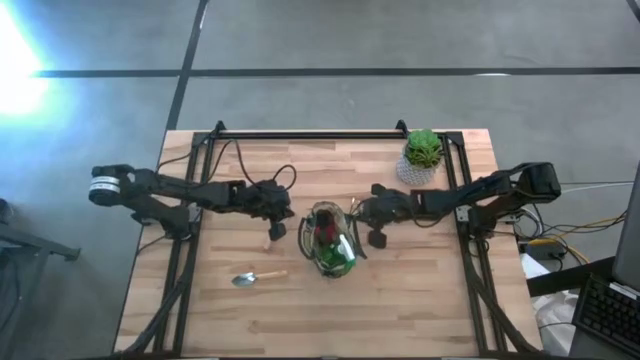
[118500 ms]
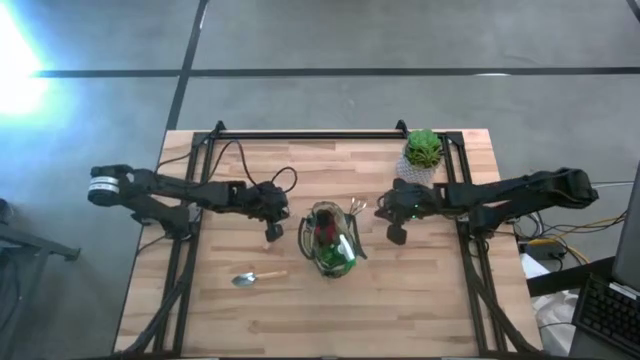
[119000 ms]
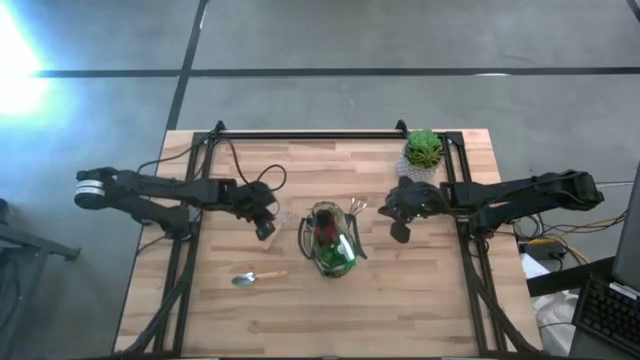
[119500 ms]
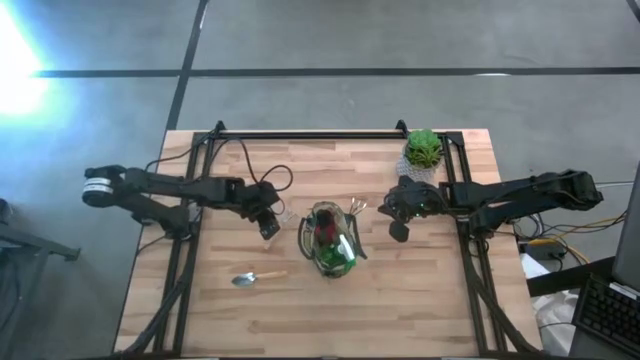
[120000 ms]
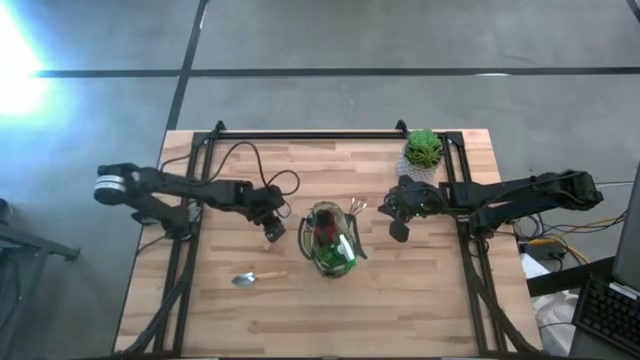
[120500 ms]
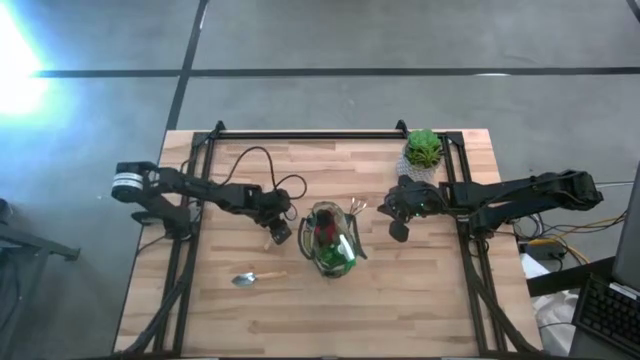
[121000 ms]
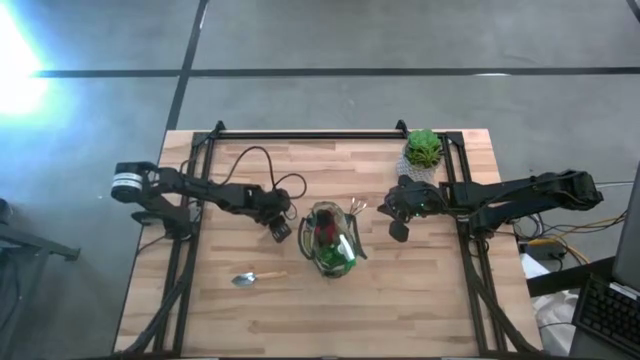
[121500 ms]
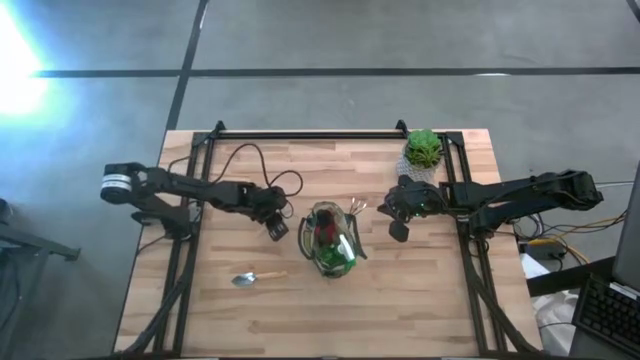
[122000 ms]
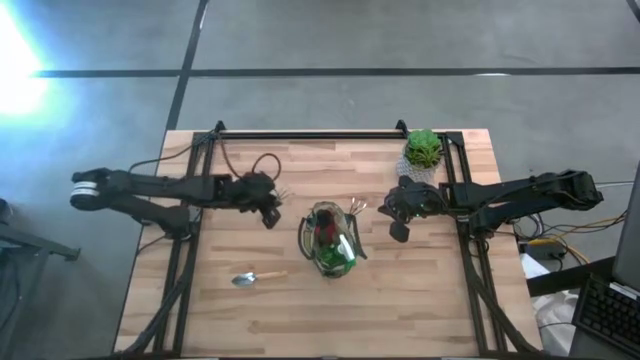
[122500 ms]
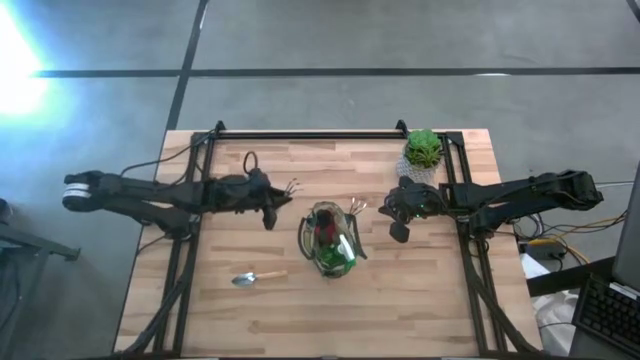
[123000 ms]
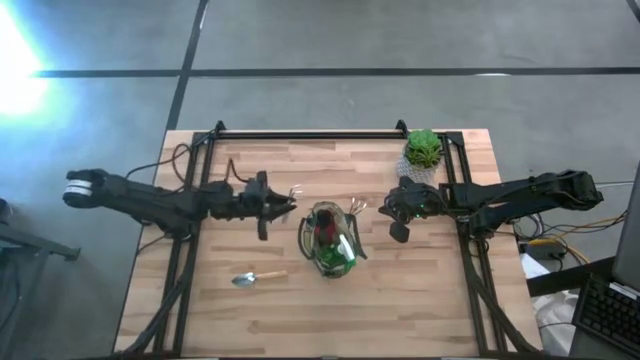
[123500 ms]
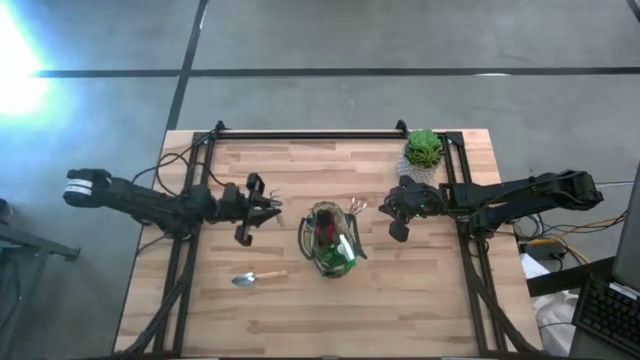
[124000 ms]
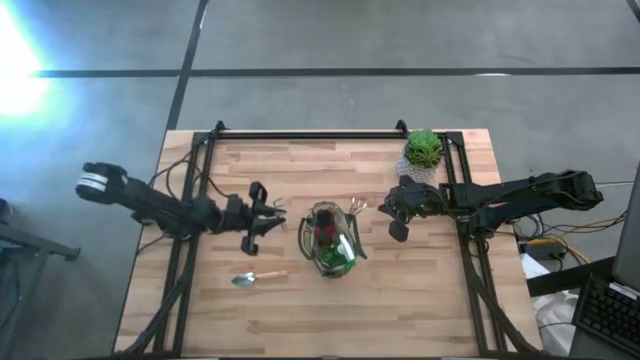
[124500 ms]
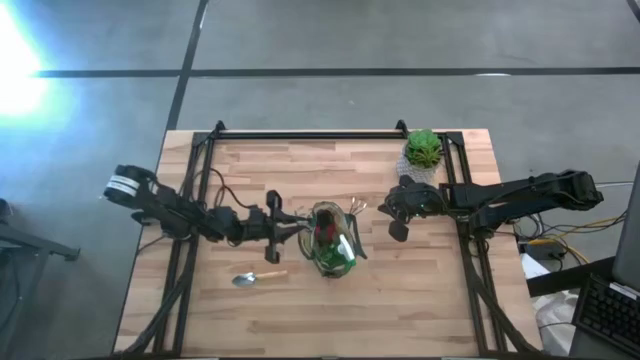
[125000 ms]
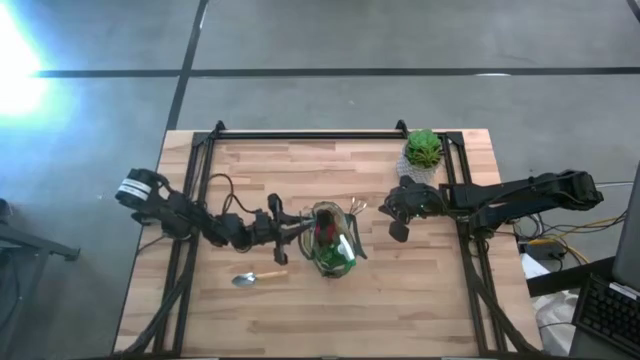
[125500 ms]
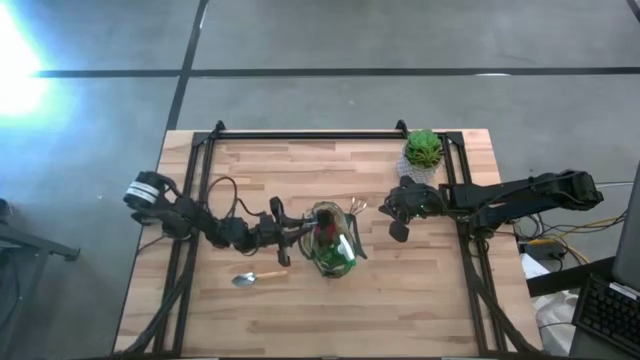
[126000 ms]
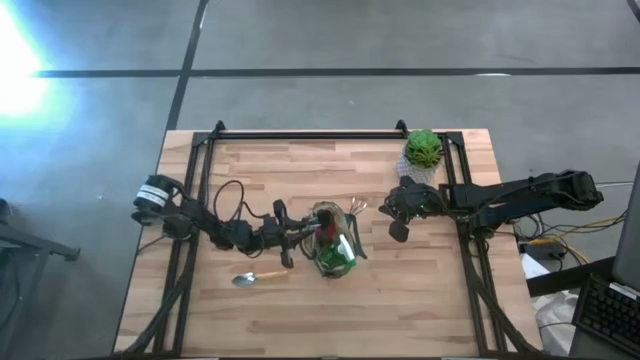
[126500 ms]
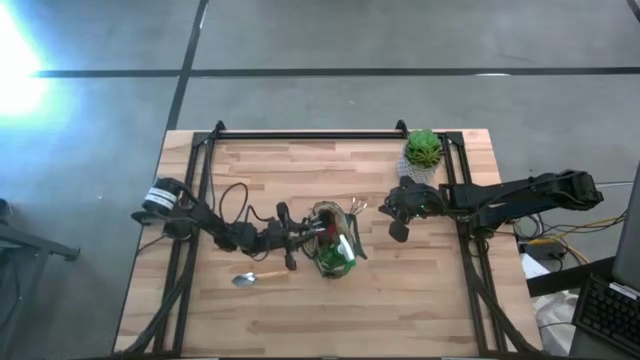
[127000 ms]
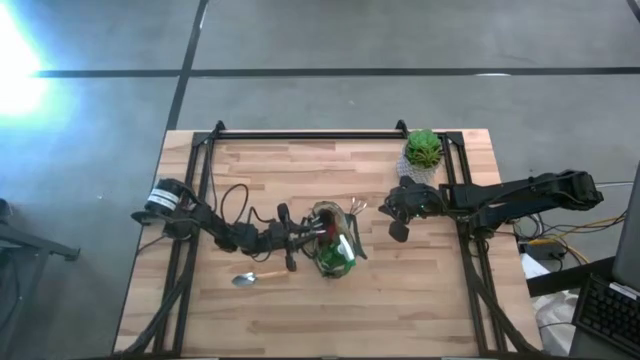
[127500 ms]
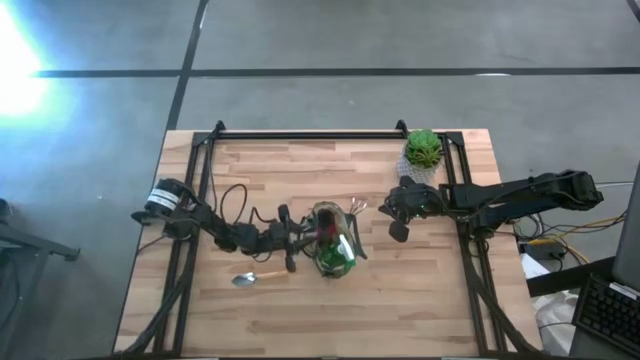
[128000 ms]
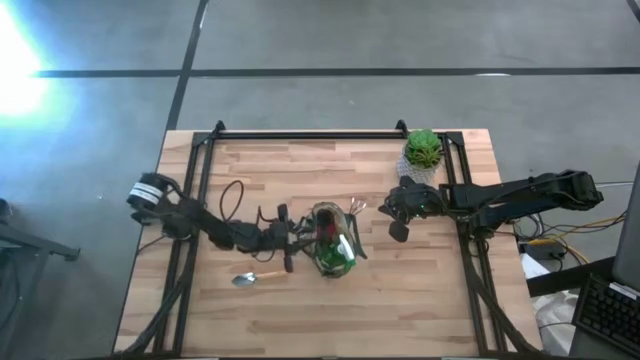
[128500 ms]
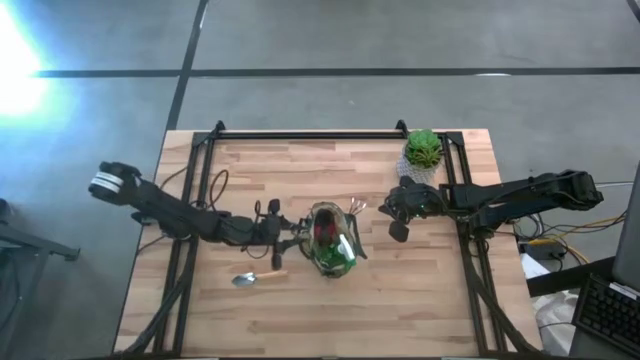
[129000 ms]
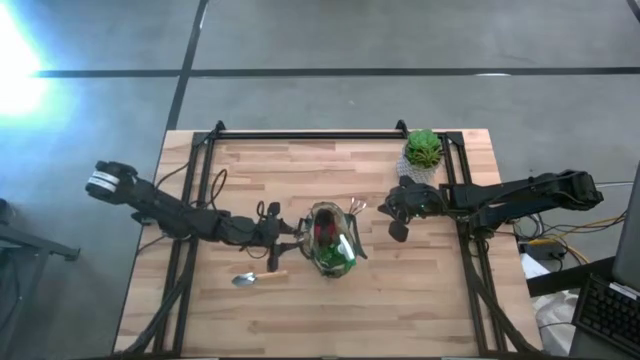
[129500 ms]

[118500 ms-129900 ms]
Task: Pick & Place Garden tools in Gardening bag
Put the light brown hand rake into the green gardening bag

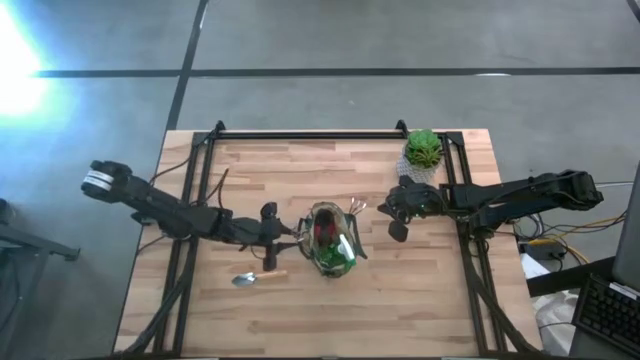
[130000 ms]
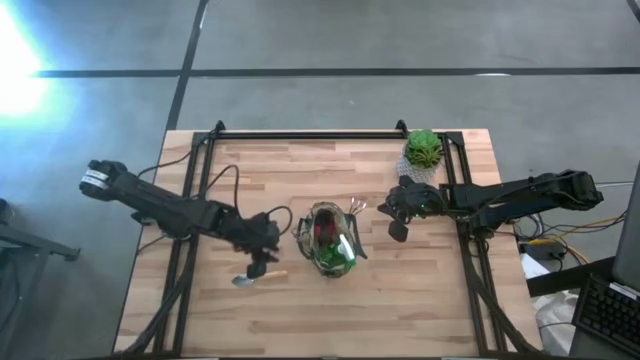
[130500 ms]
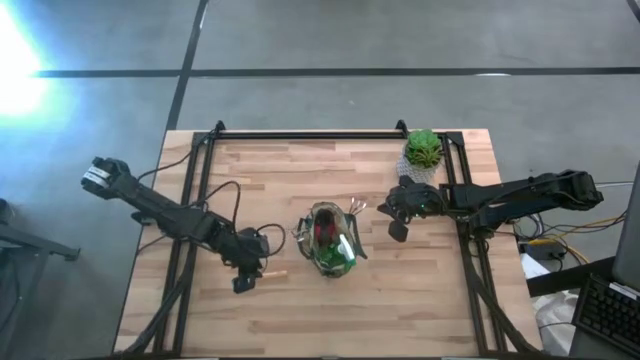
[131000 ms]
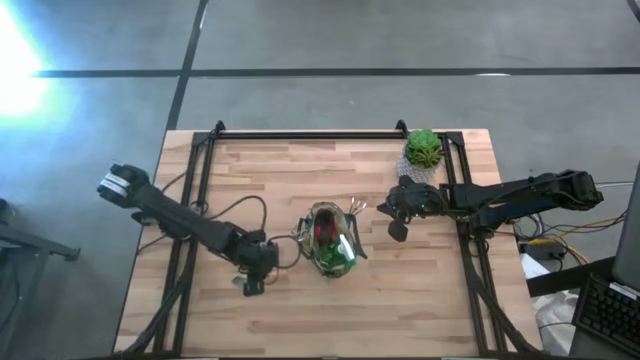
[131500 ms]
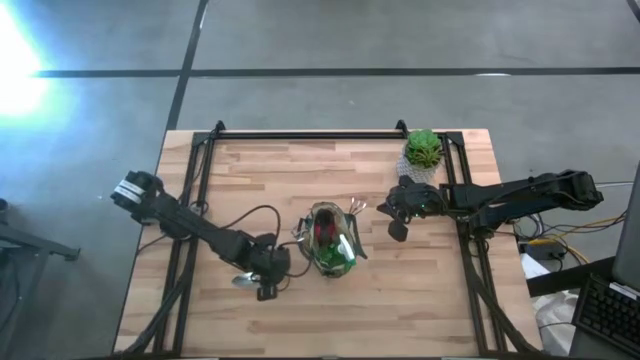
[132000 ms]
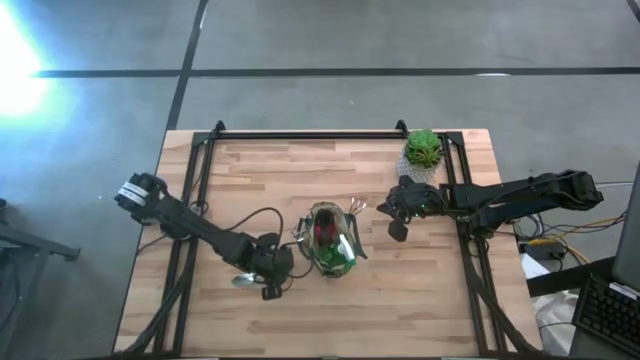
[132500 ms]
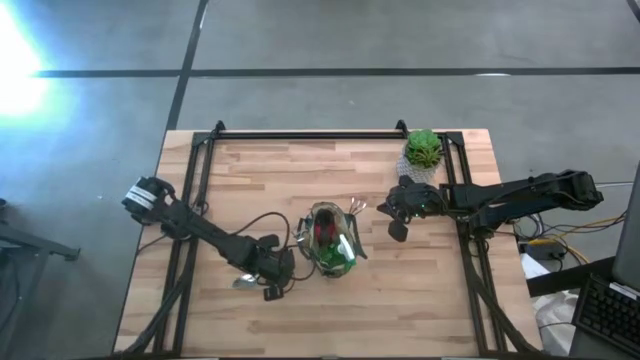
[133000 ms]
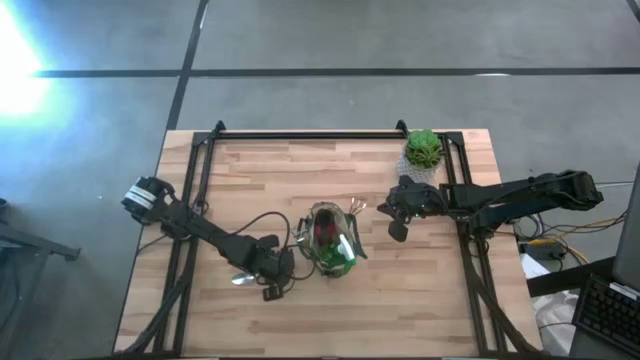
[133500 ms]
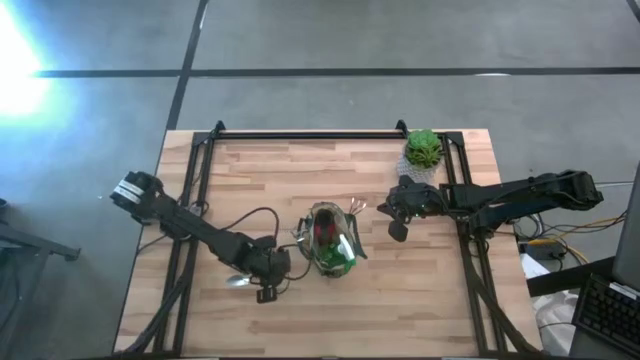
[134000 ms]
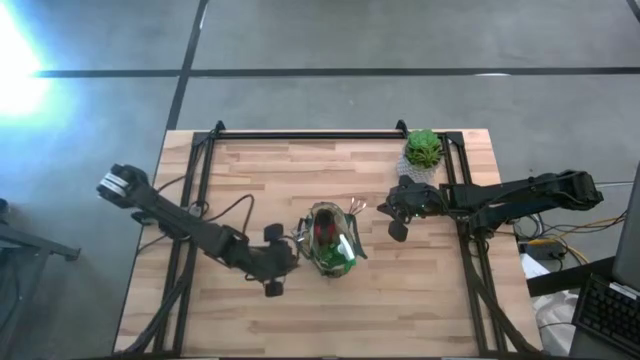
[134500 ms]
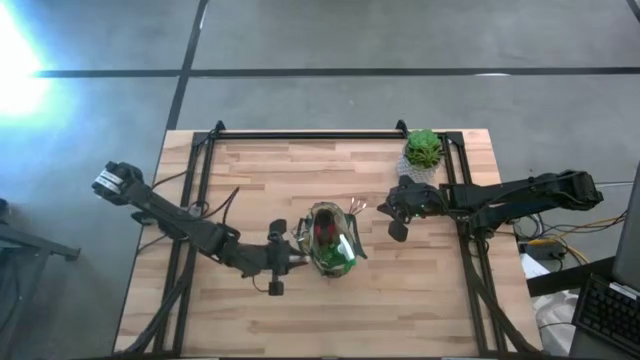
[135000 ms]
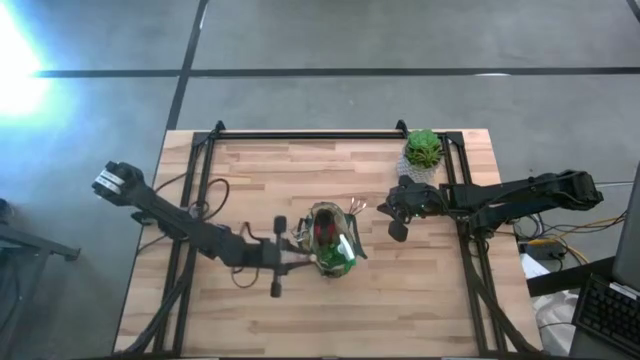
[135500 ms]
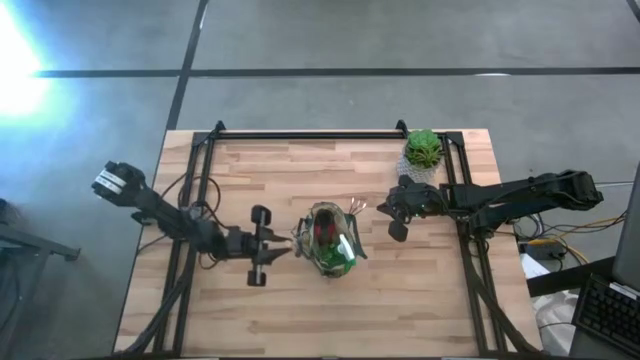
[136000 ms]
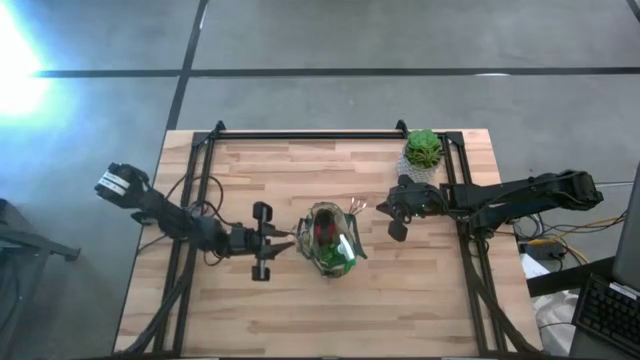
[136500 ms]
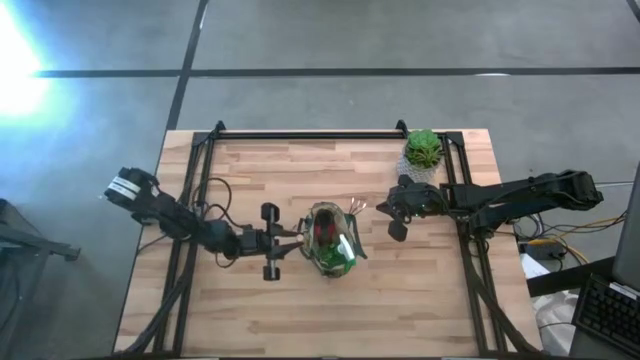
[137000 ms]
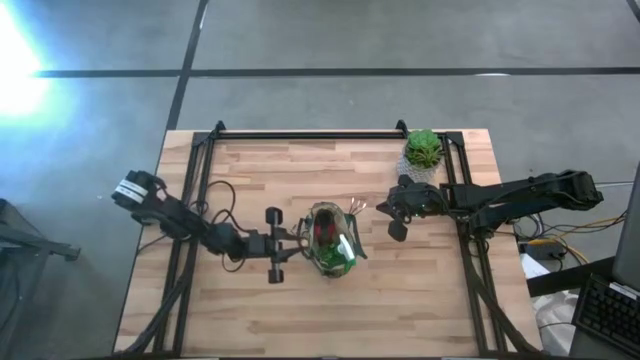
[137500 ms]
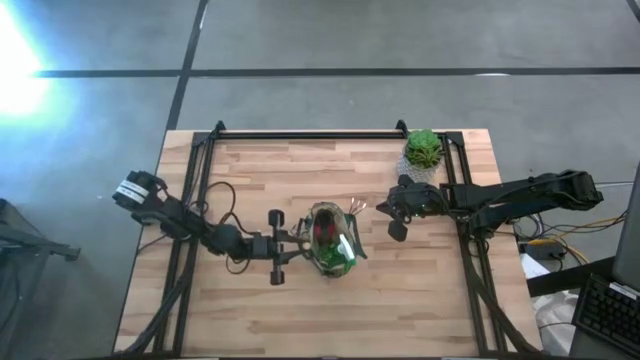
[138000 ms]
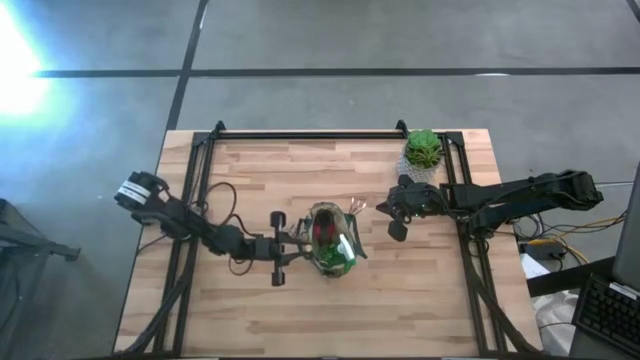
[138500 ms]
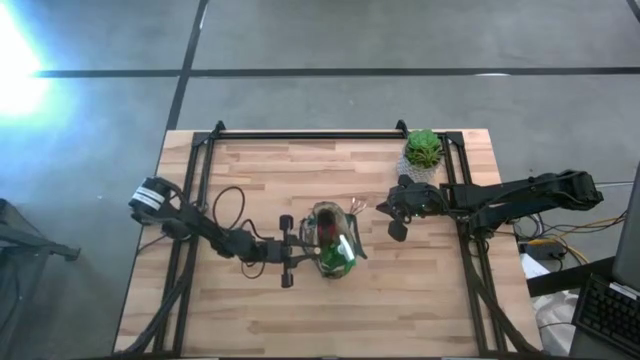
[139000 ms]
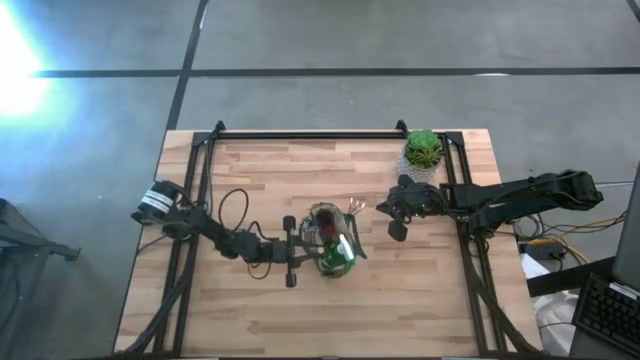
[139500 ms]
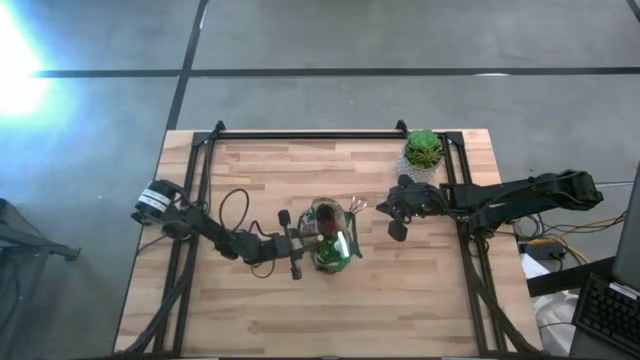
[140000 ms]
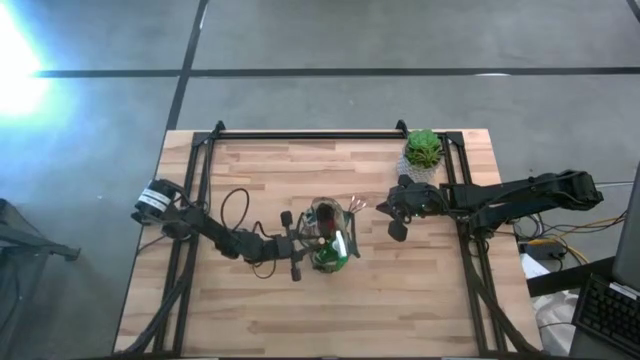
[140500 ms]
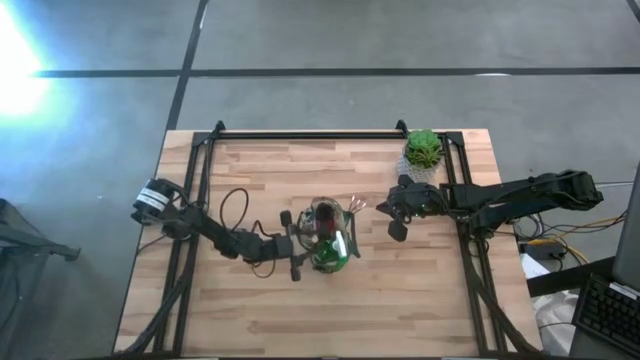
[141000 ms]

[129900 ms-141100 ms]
Put the light brown trowel into the green gardening bag
